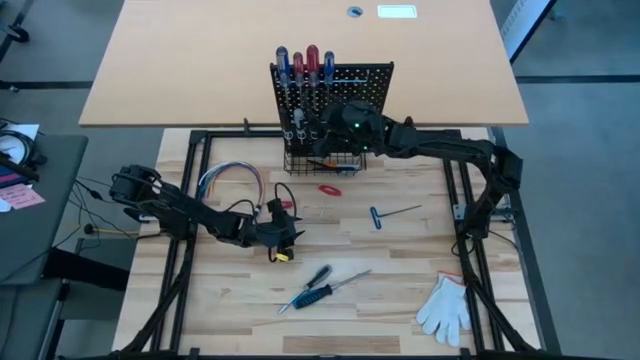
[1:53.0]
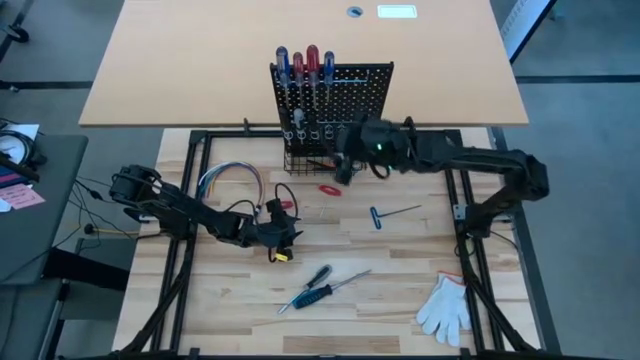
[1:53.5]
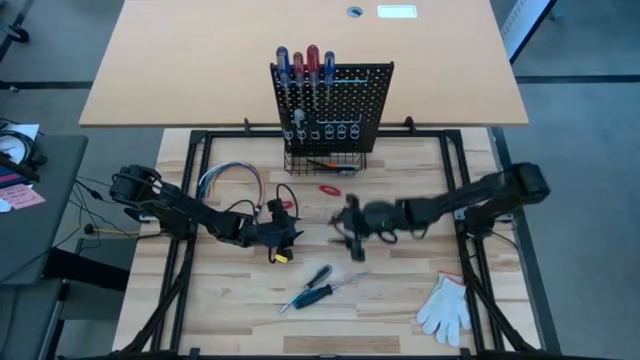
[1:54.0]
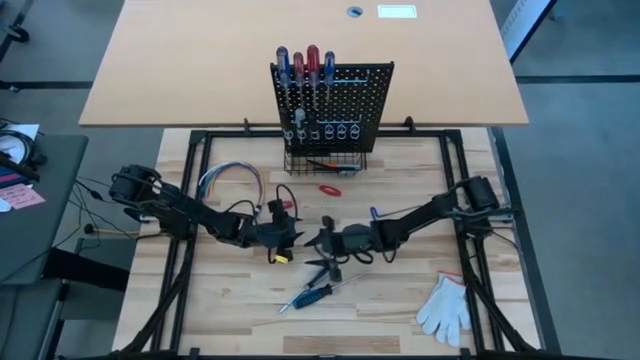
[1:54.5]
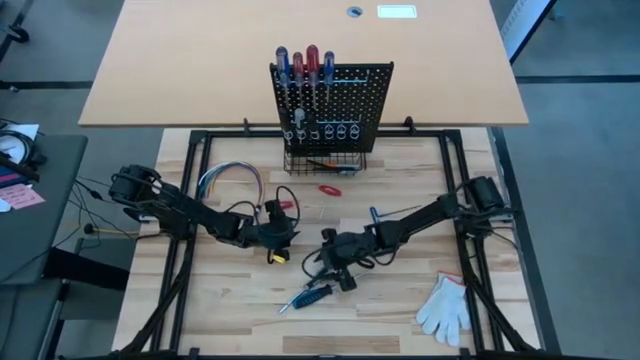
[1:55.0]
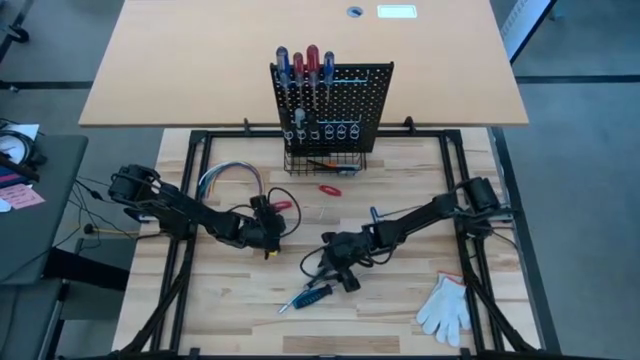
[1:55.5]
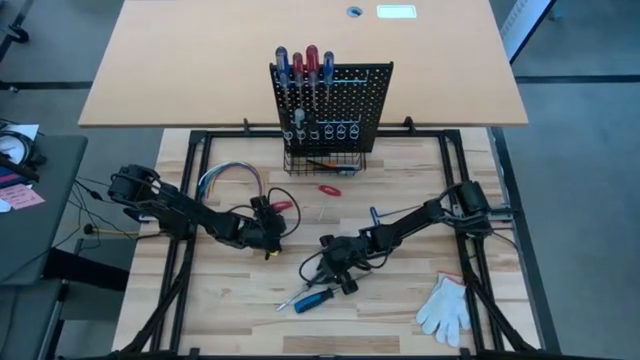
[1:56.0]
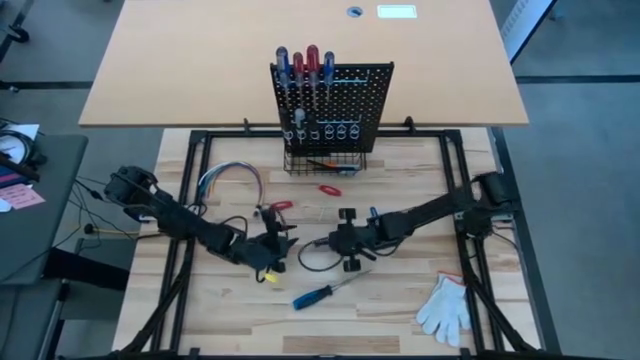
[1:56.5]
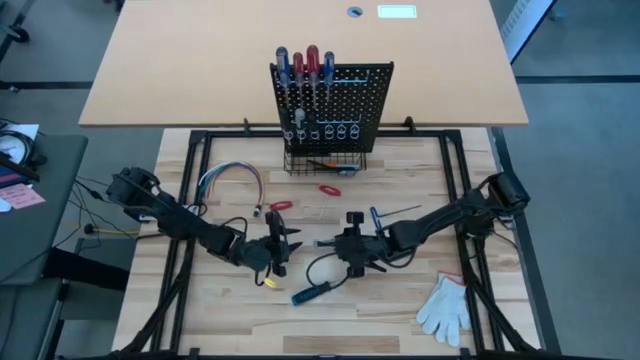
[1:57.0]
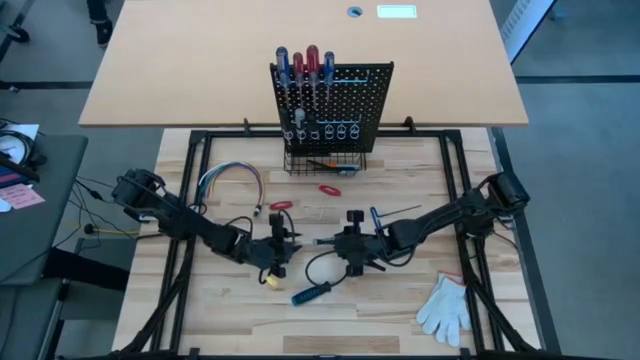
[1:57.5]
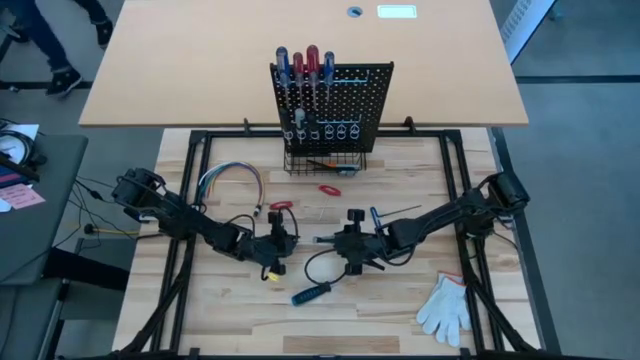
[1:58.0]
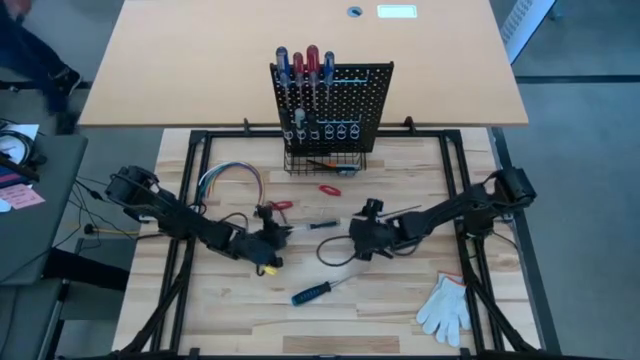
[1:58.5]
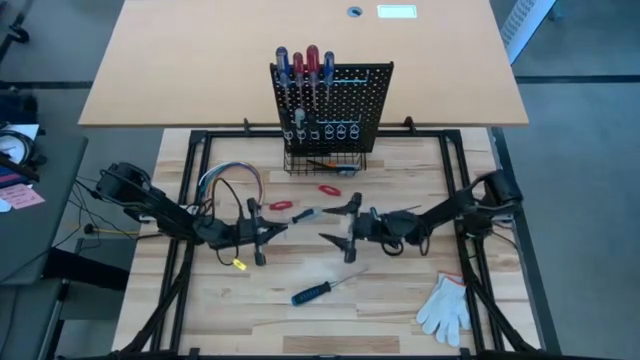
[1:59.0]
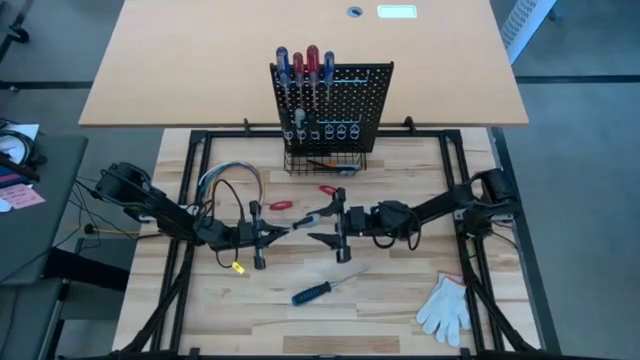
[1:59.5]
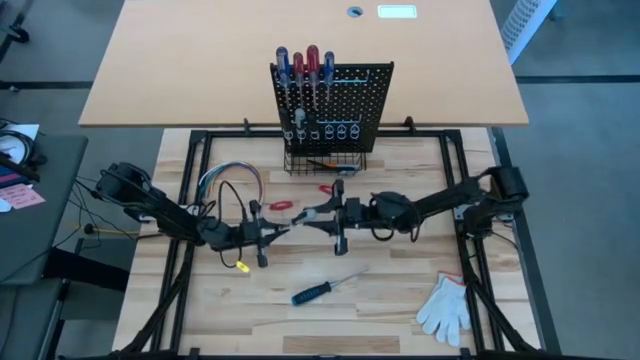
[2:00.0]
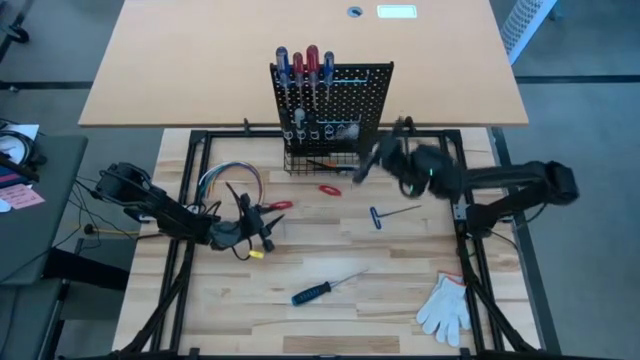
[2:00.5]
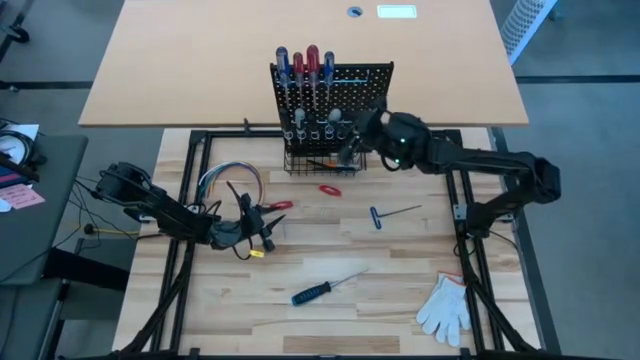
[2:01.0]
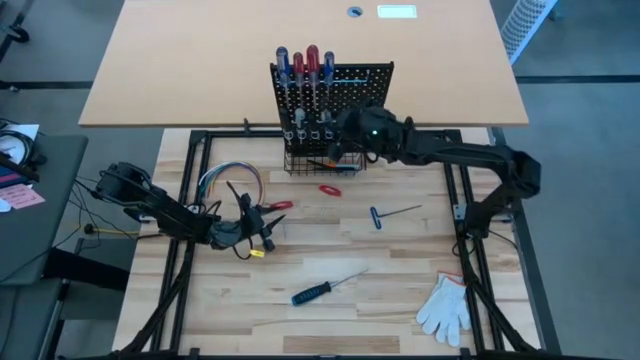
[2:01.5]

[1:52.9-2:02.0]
Task: Hang tools onto peg board
Hang the gray screwdriver on the pegboard

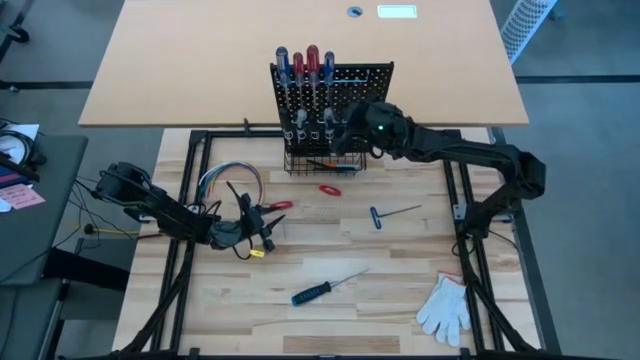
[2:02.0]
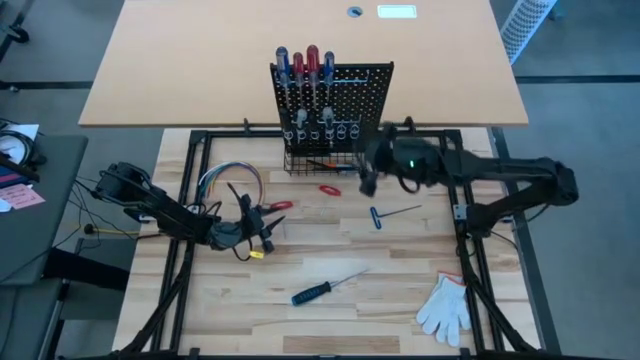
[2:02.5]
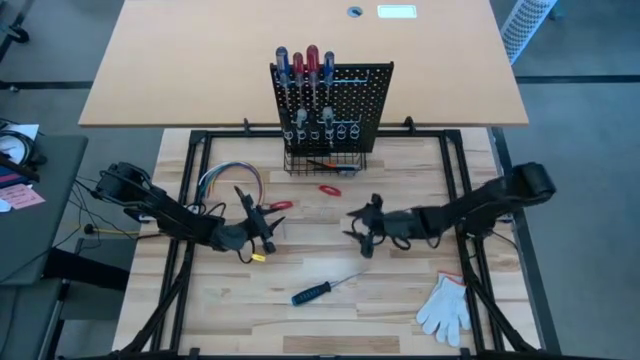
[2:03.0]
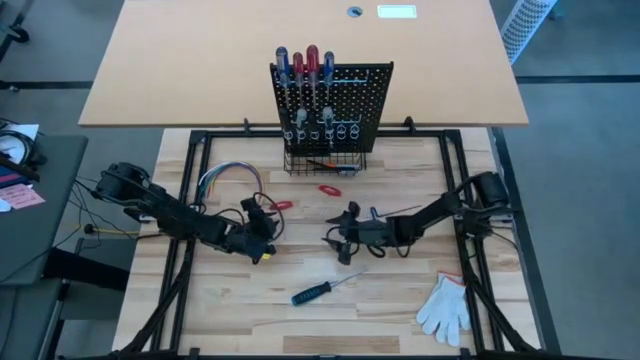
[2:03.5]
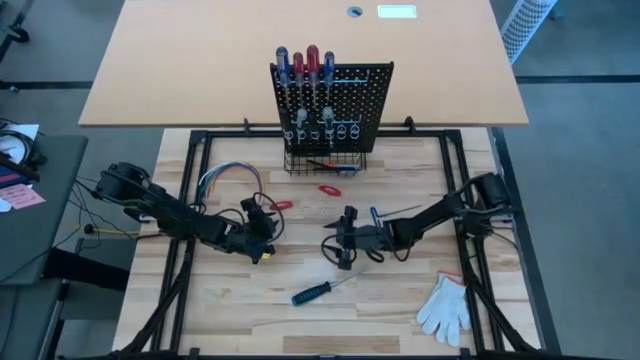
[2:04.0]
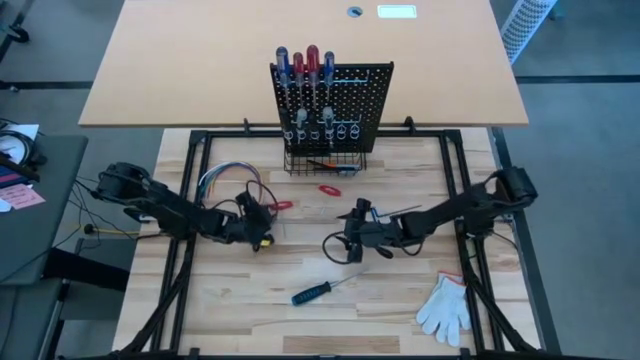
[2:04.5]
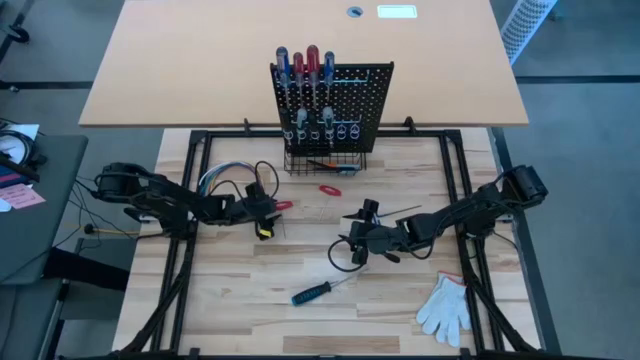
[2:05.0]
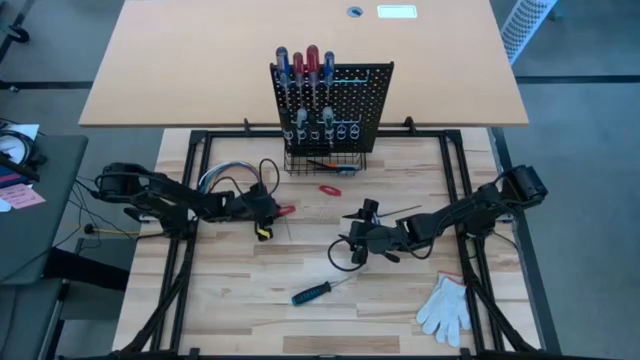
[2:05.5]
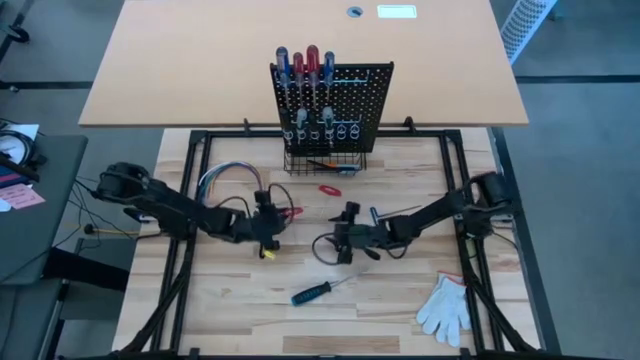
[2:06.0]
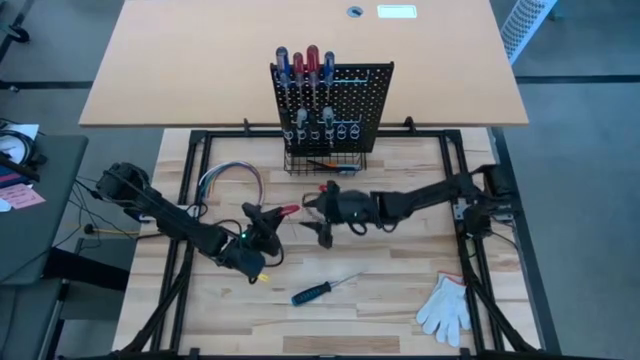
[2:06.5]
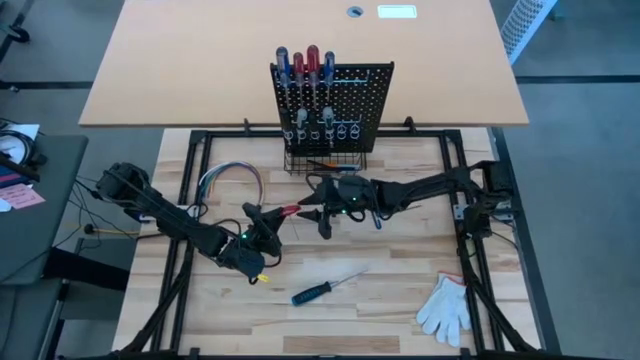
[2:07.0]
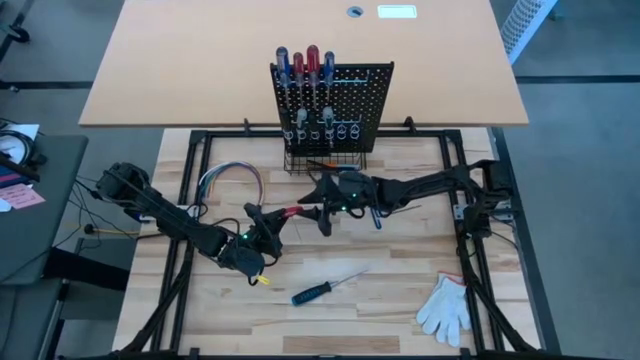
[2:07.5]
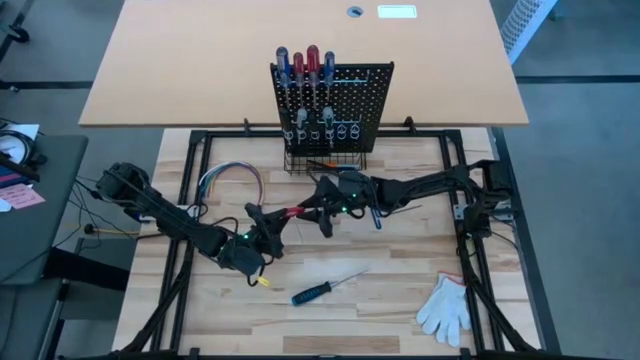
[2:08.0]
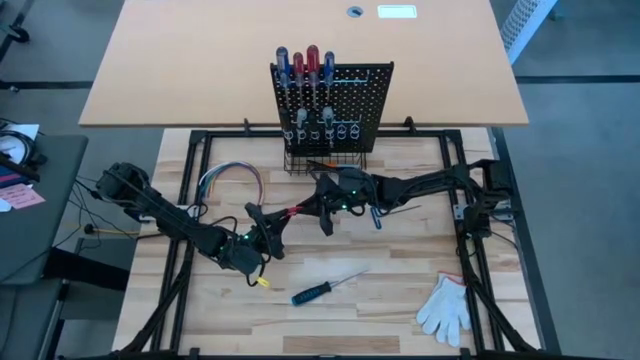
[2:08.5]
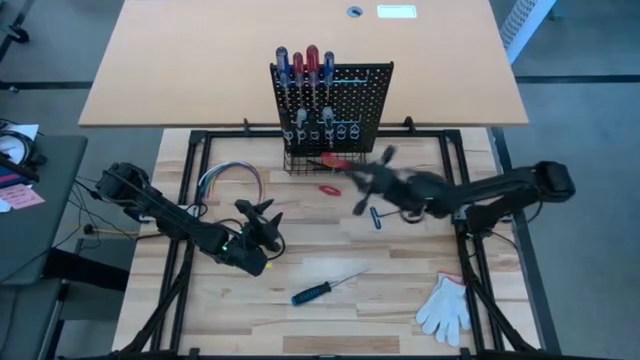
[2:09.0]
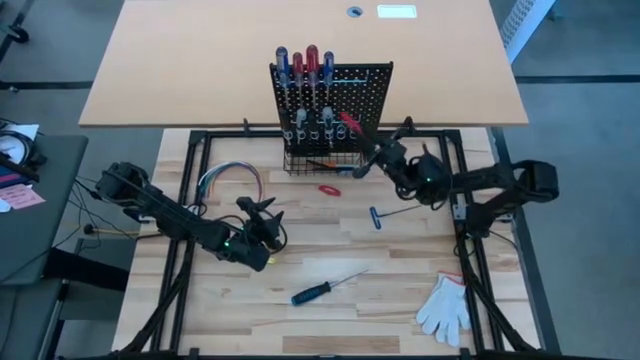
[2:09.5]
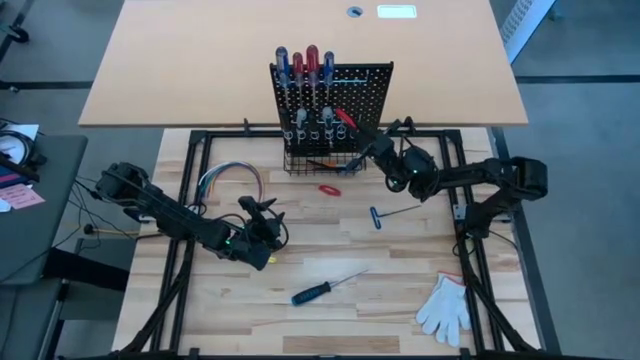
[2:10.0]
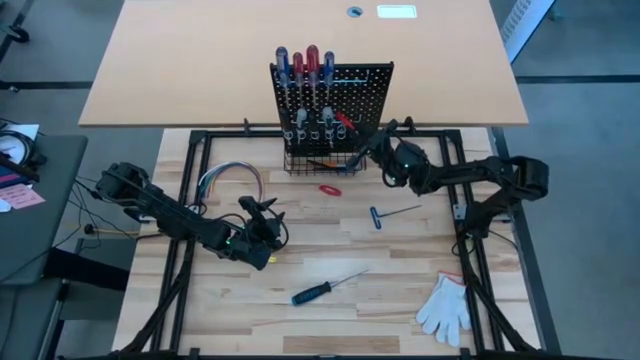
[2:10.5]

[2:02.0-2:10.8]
Hang the left red allen wrench on the pegboard

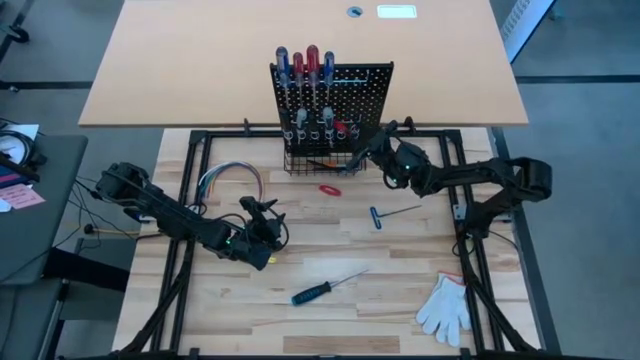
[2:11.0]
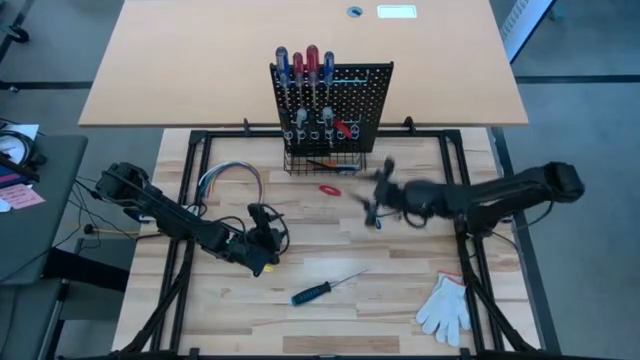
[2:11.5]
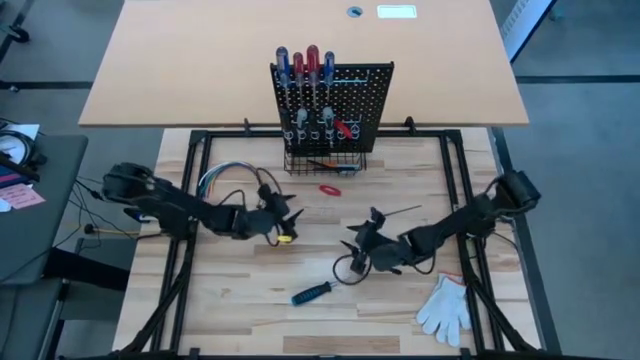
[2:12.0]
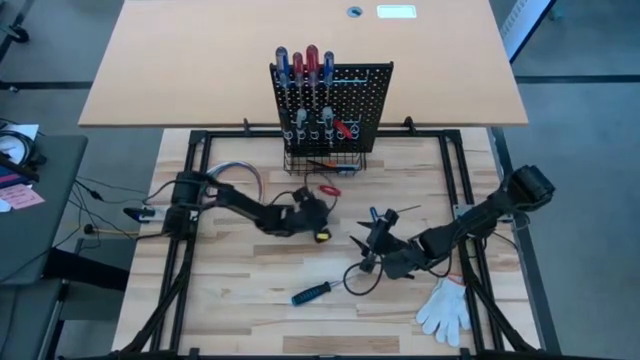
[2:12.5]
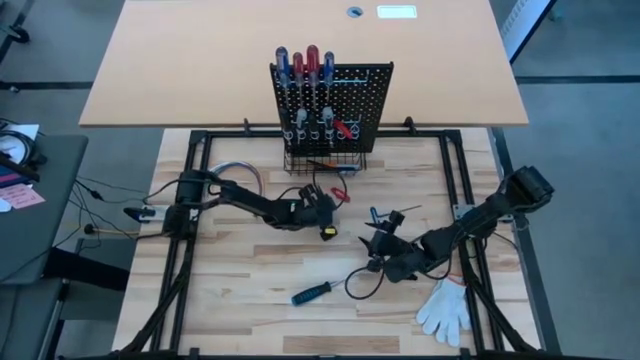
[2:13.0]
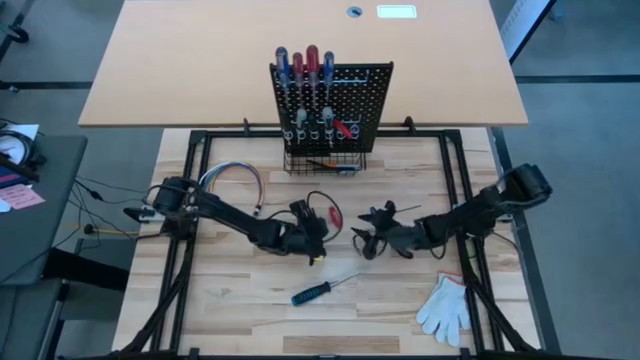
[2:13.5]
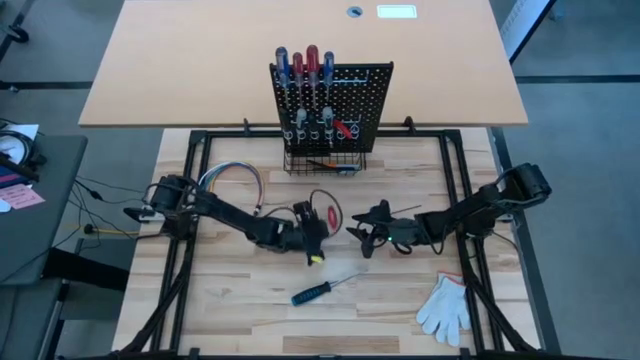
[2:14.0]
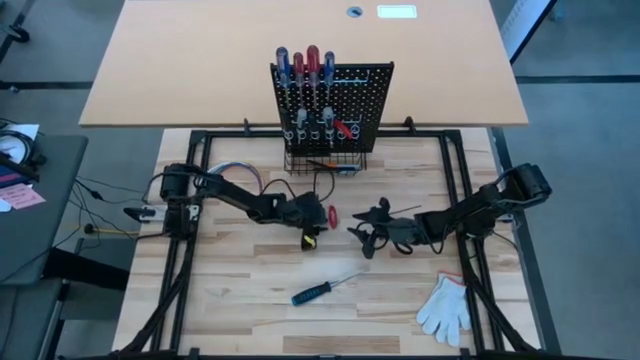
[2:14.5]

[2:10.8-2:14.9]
Hang the red allen wrench on the pegboard
